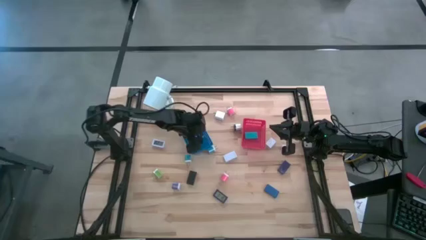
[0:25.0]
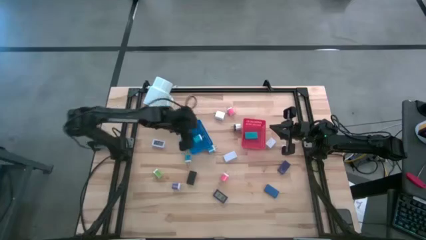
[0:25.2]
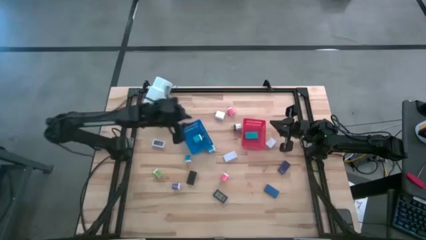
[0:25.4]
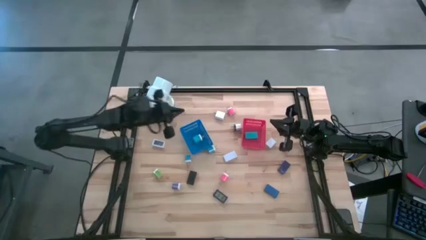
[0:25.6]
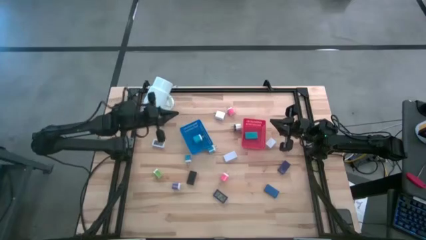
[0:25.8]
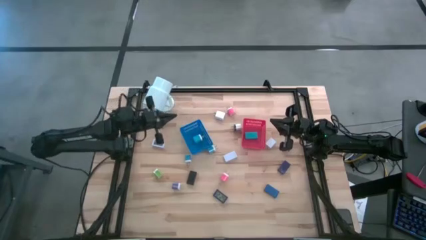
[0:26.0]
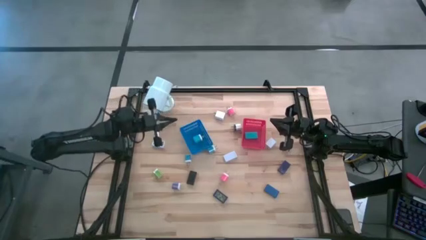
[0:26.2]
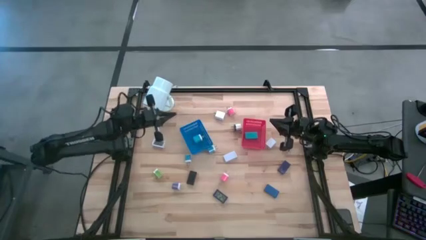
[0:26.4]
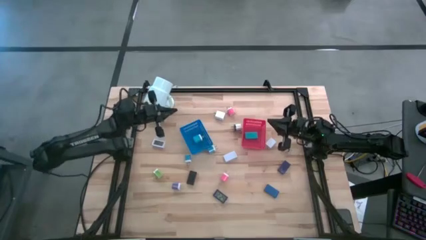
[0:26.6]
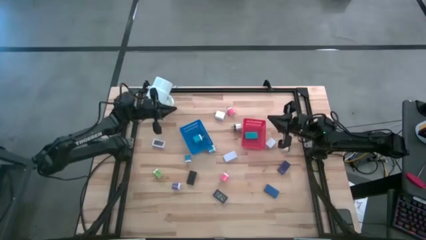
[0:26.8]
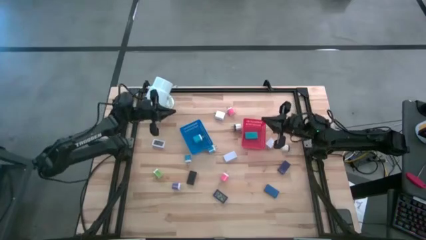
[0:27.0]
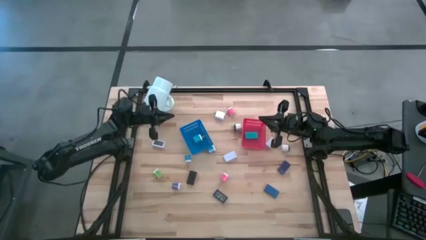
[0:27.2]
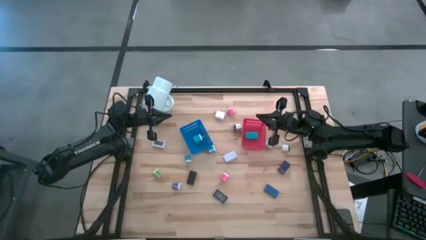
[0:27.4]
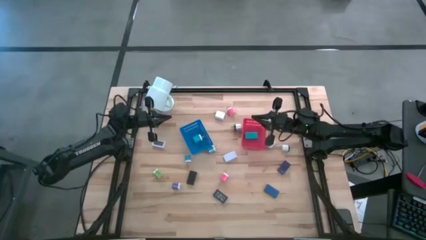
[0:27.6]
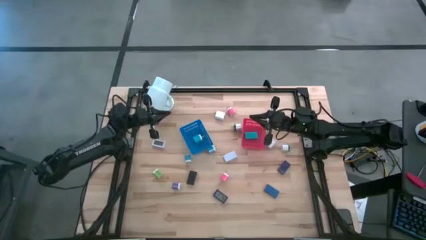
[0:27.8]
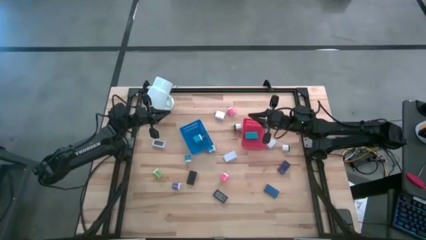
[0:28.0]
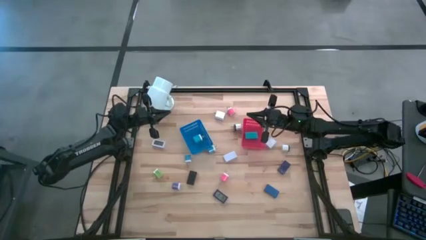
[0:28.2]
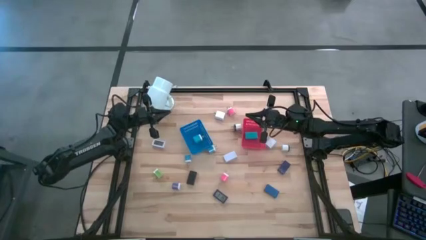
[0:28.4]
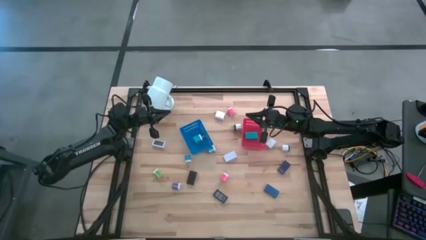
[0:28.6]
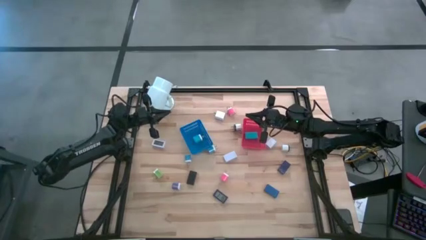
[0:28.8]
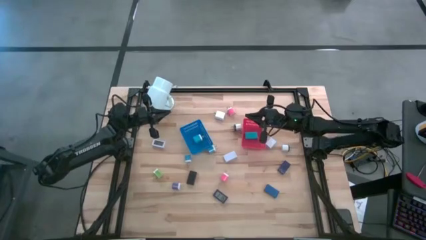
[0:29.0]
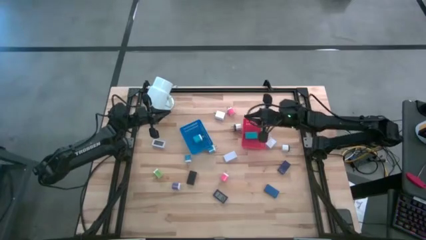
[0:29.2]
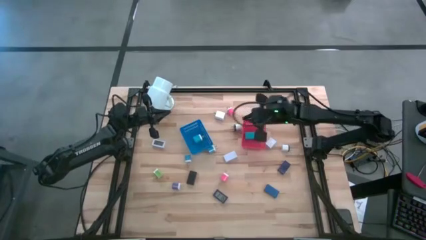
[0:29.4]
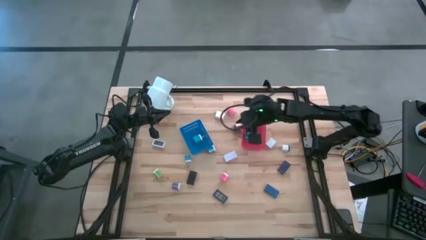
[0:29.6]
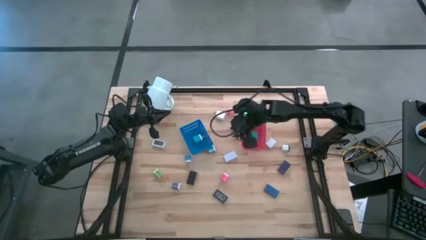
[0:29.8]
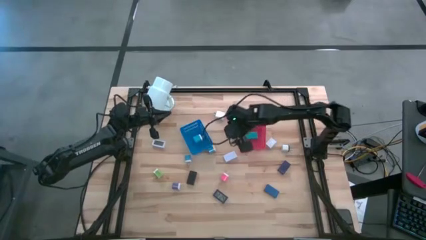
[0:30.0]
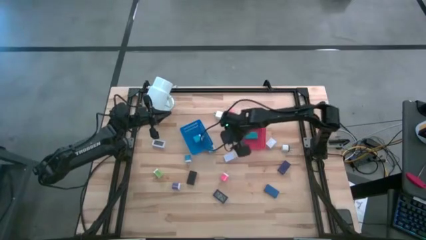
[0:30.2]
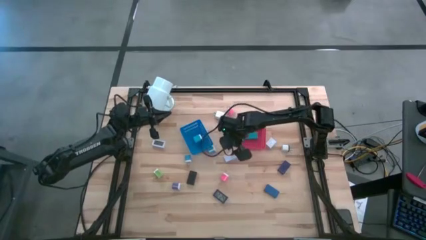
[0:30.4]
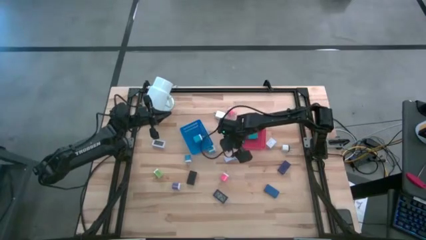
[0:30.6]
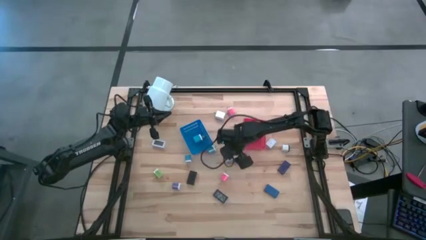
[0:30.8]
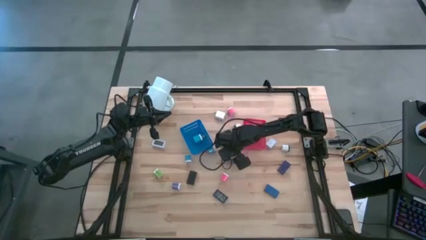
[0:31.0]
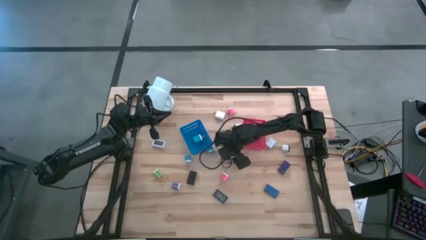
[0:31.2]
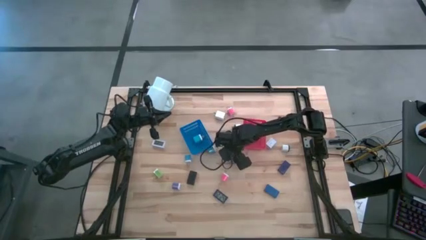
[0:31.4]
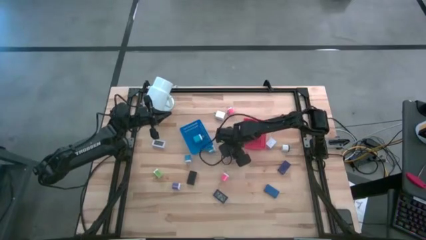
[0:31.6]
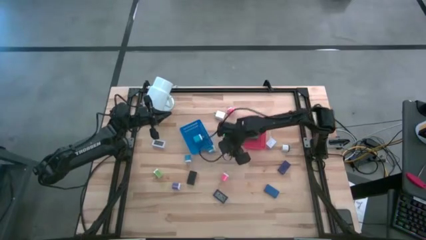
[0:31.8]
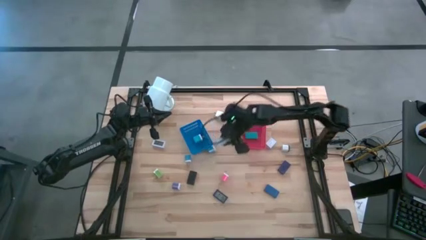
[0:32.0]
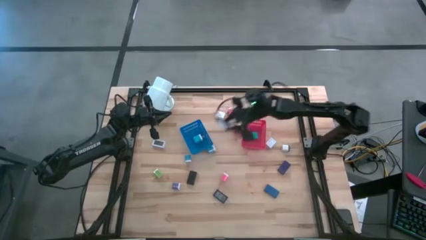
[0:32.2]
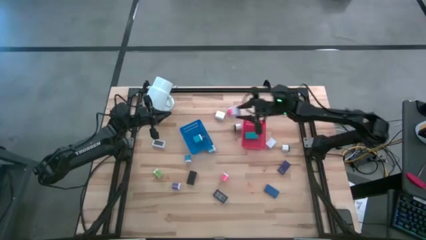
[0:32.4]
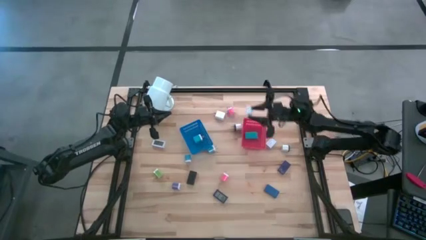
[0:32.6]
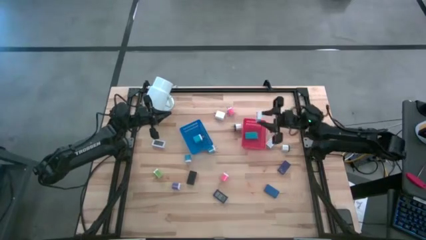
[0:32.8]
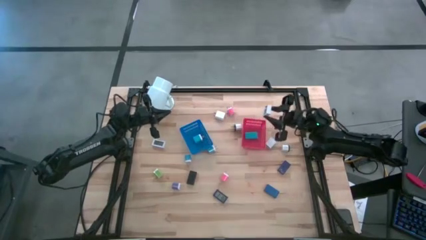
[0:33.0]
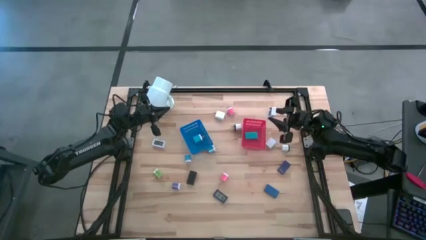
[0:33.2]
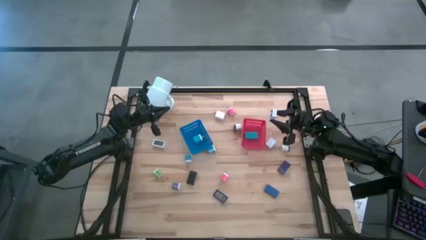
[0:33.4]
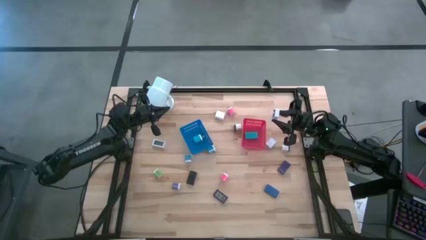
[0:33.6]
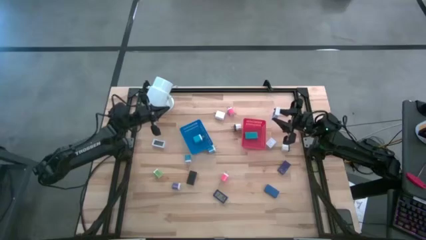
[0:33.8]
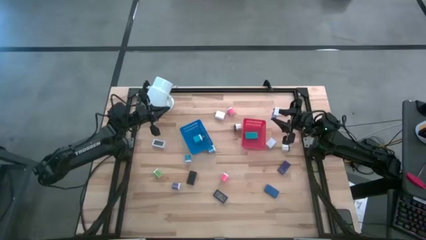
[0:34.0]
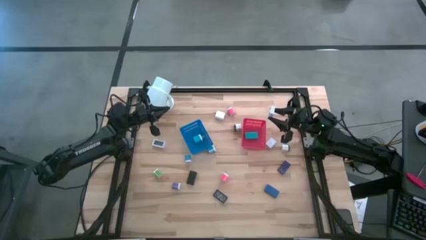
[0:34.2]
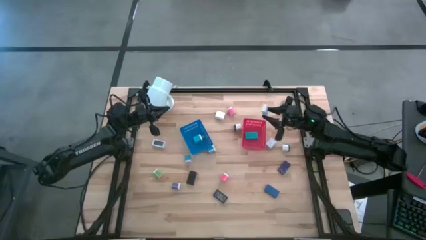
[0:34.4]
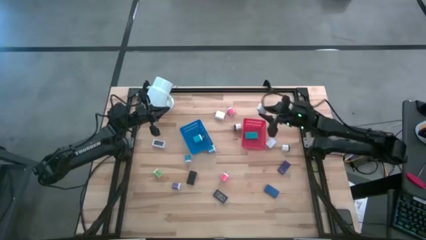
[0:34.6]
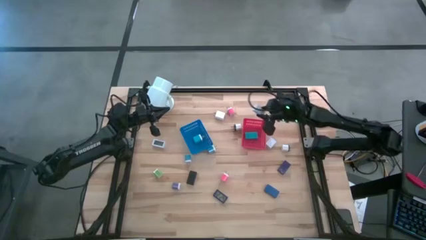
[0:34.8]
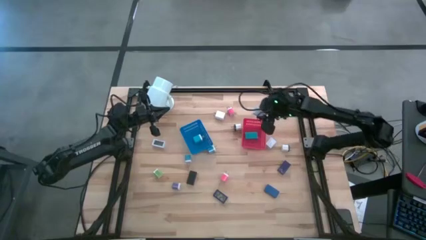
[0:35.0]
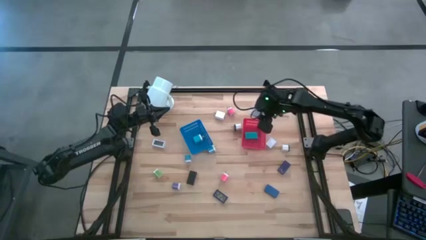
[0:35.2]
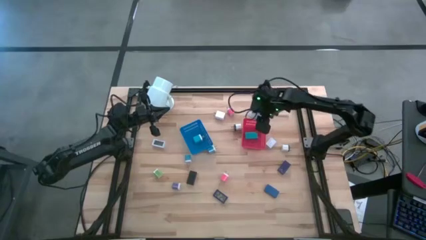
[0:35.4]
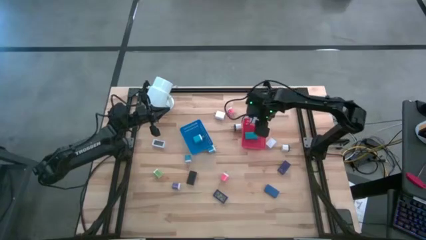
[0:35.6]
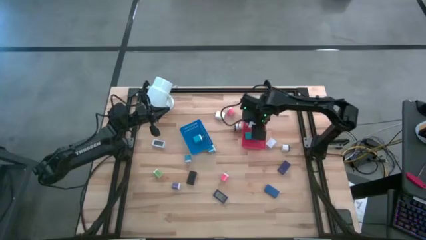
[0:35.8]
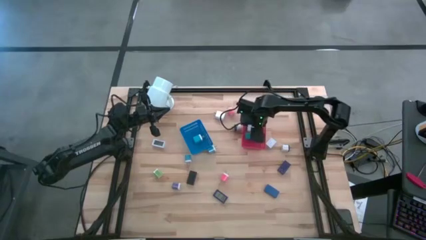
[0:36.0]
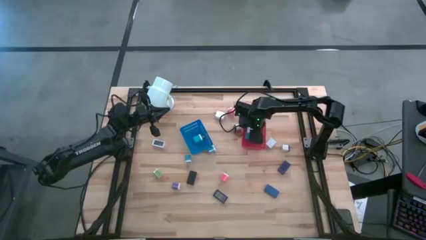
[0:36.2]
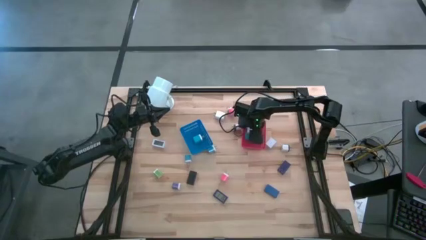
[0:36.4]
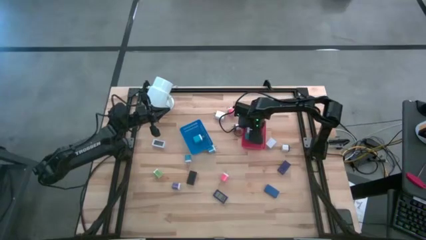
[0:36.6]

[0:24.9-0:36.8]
Task: Pick & Place Office items
Put the right white digital clock into the red bin
